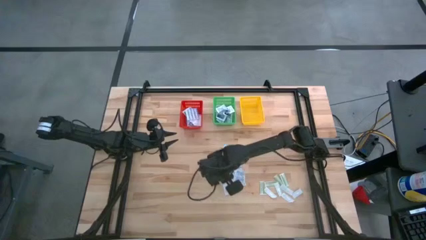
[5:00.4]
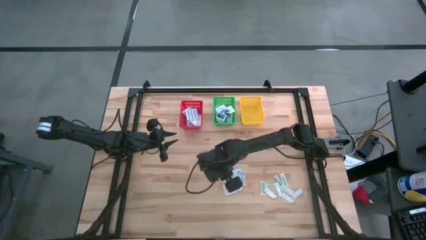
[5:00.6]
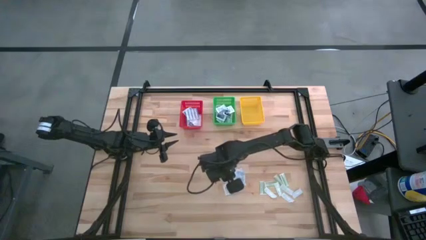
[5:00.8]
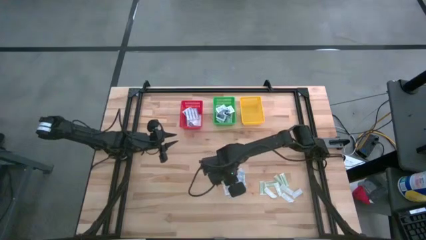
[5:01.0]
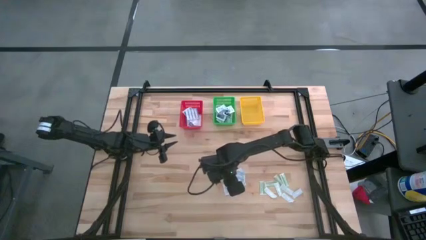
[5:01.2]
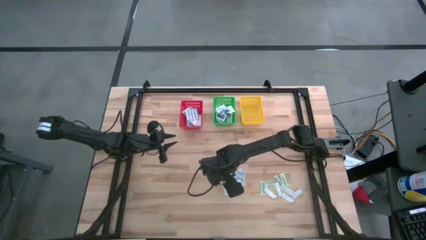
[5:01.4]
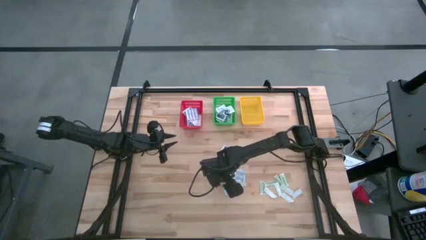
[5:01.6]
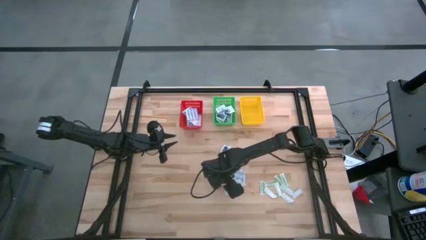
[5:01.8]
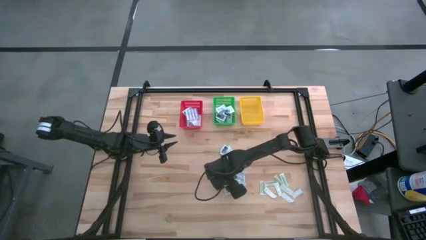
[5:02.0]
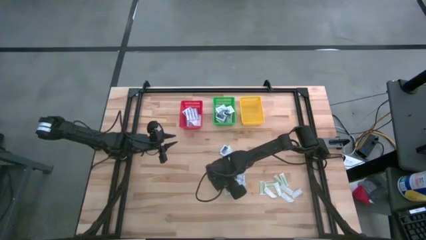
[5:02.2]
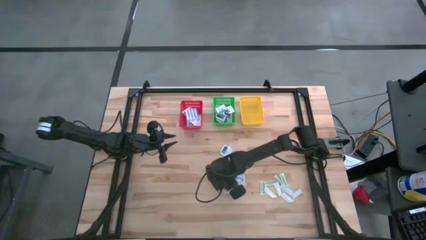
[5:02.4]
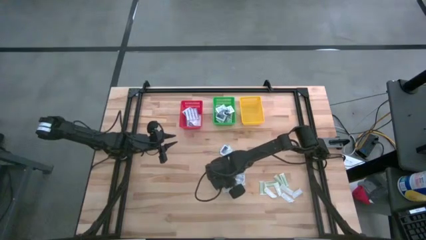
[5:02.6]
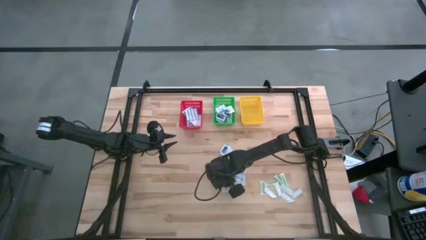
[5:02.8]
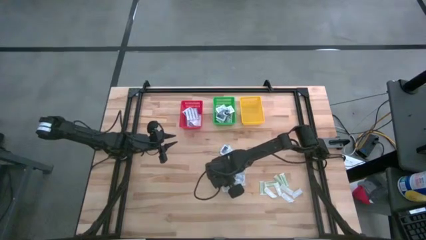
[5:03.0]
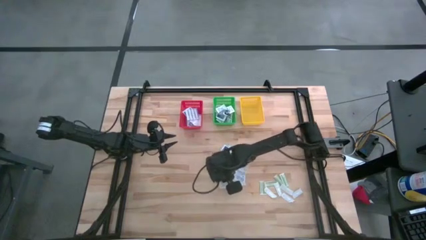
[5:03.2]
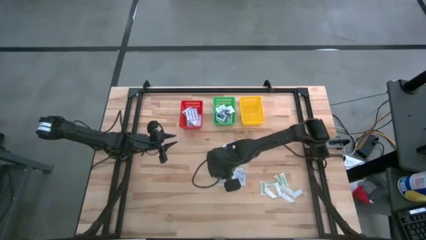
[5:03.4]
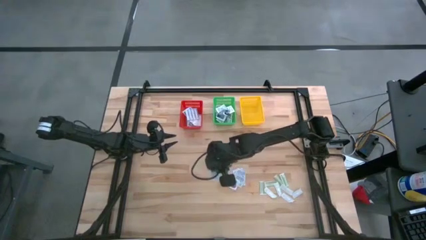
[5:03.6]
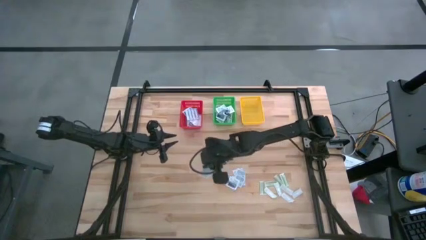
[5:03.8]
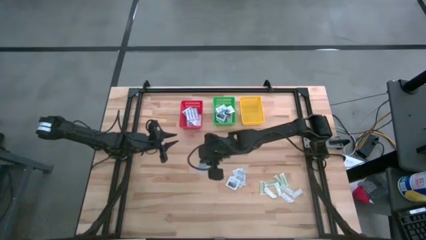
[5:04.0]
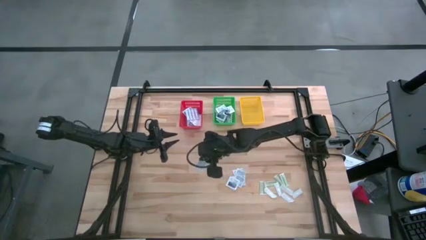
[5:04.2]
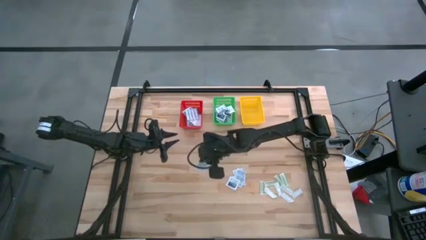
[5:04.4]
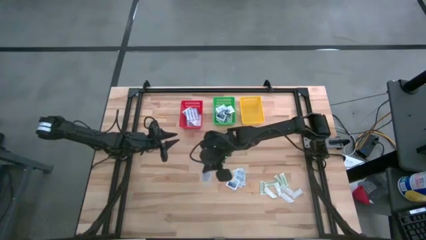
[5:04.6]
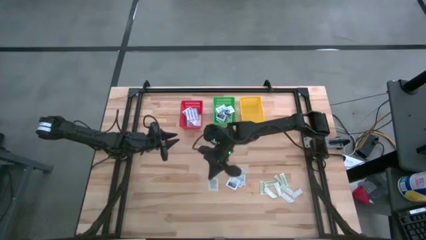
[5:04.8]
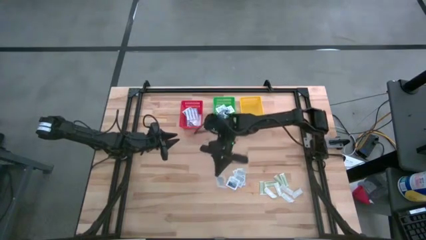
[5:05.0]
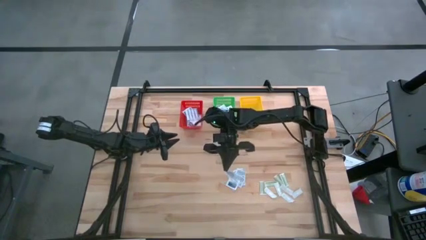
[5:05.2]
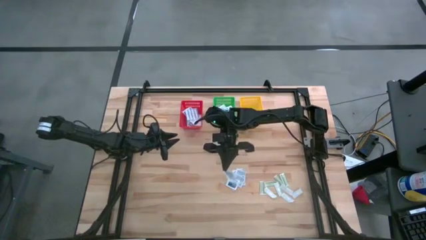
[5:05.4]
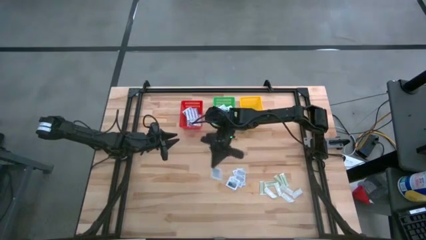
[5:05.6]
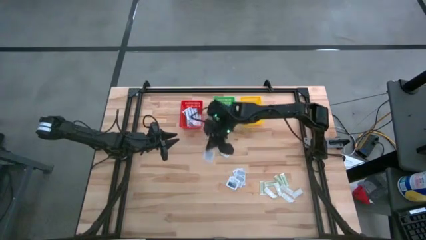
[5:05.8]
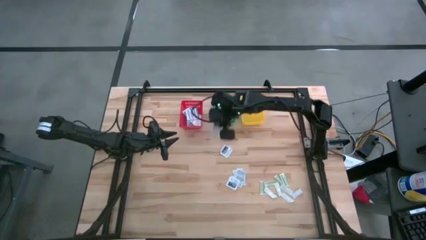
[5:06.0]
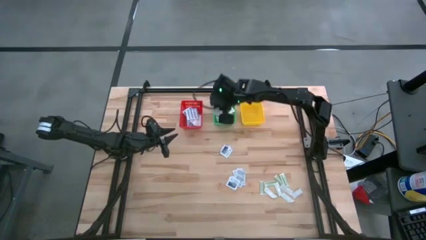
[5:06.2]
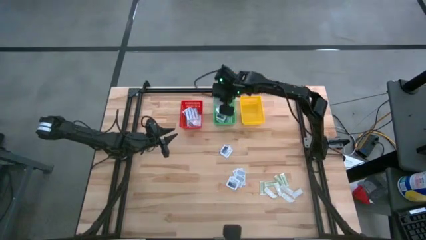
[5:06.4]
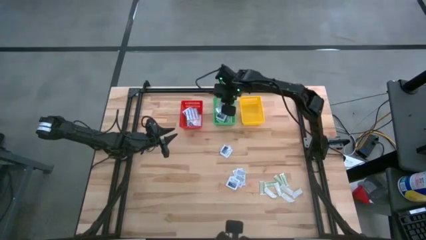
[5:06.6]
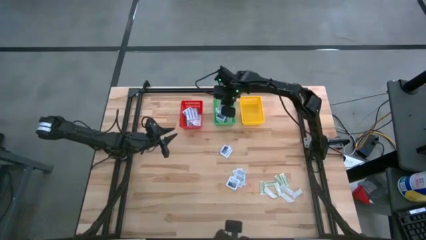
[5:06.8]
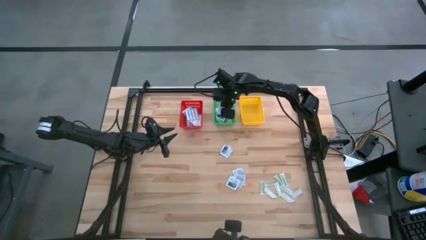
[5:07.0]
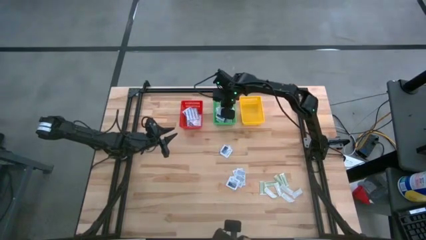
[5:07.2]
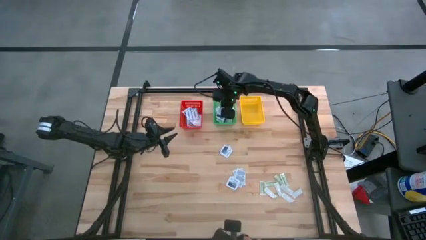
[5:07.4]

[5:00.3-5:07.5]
Task: Pick & Place First Aid Supplies
Put the alcohol pad into the green basket

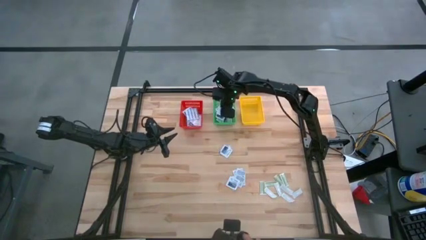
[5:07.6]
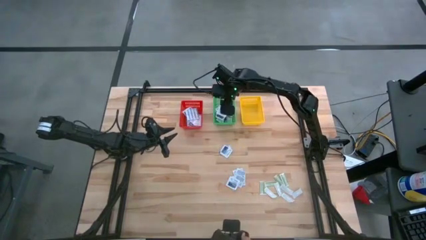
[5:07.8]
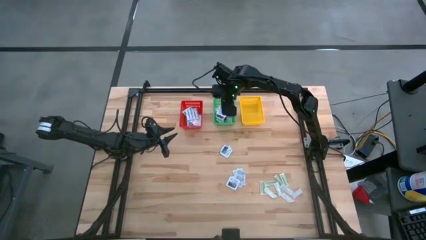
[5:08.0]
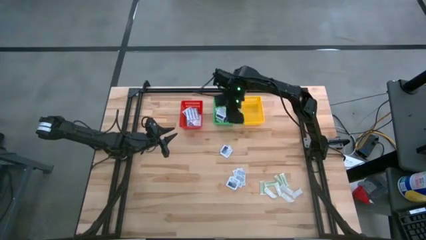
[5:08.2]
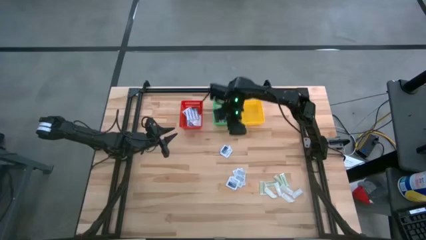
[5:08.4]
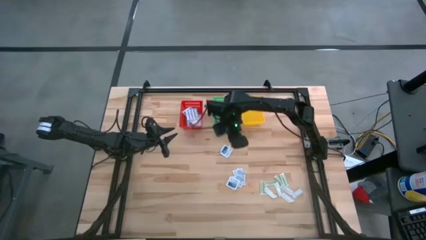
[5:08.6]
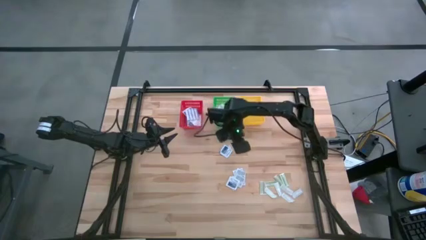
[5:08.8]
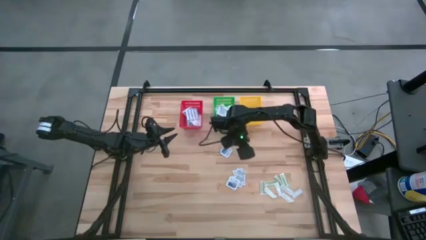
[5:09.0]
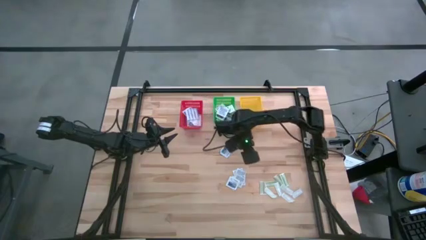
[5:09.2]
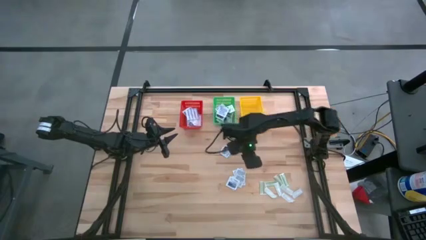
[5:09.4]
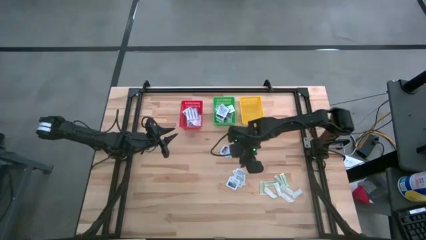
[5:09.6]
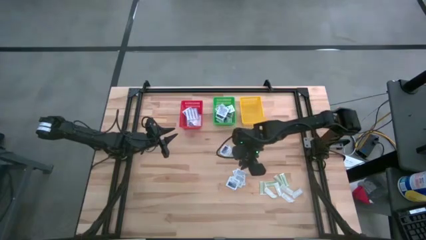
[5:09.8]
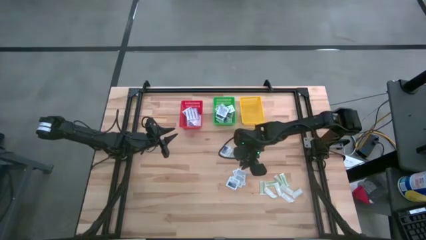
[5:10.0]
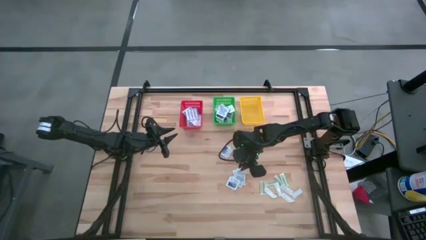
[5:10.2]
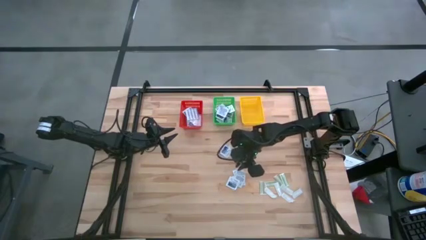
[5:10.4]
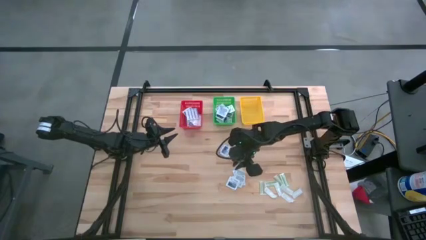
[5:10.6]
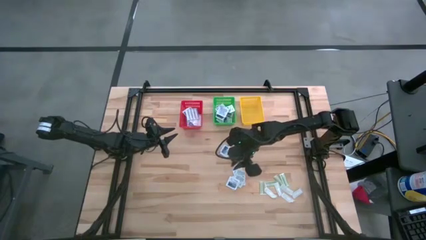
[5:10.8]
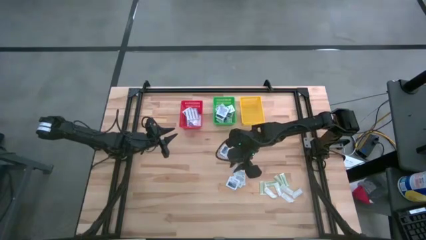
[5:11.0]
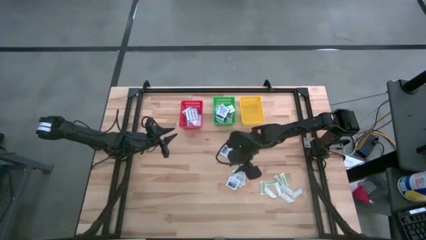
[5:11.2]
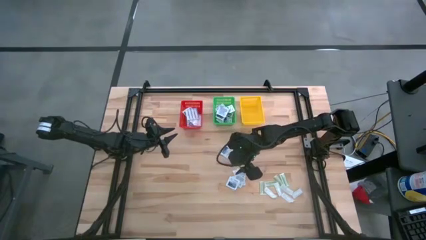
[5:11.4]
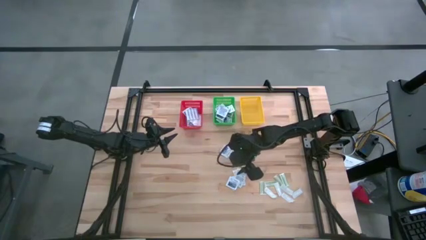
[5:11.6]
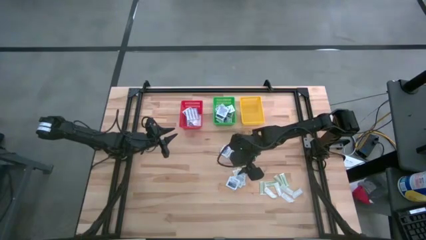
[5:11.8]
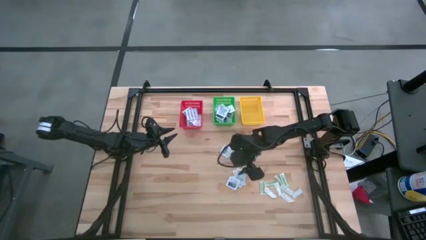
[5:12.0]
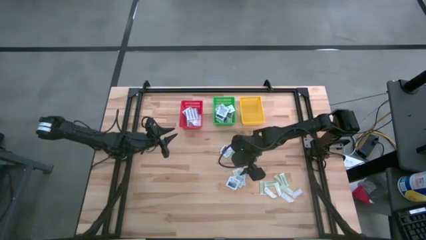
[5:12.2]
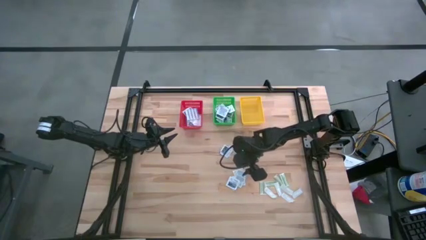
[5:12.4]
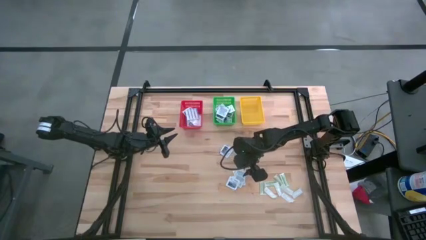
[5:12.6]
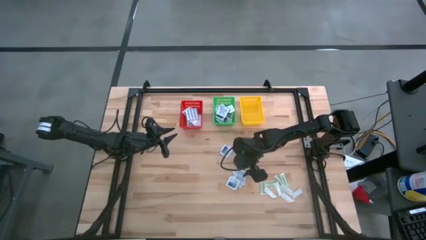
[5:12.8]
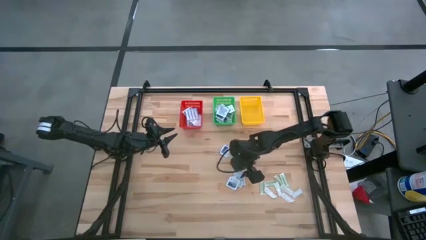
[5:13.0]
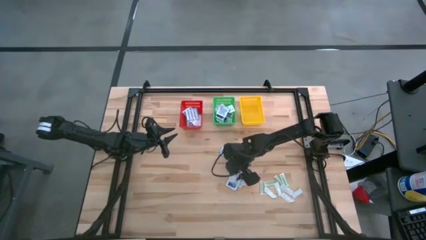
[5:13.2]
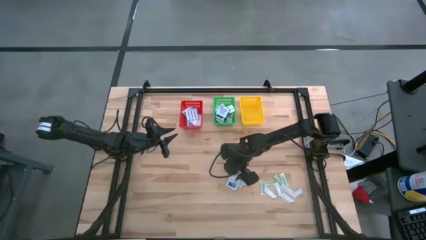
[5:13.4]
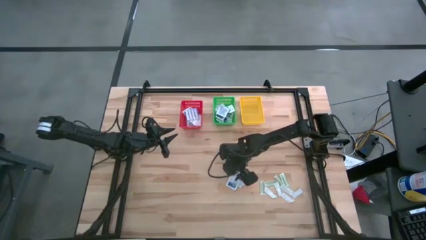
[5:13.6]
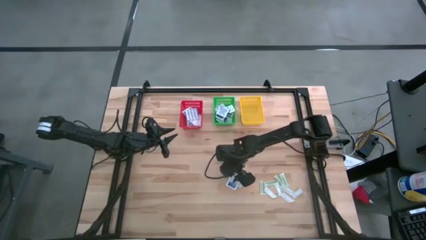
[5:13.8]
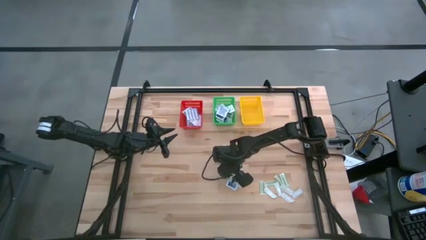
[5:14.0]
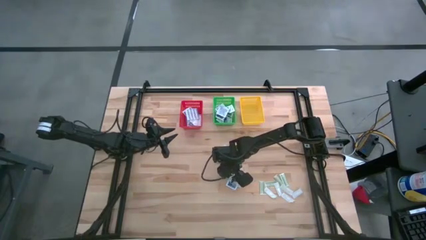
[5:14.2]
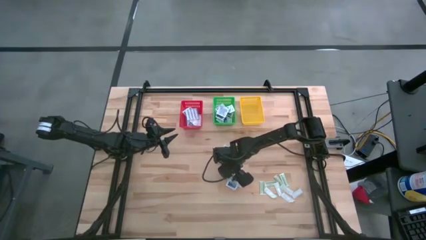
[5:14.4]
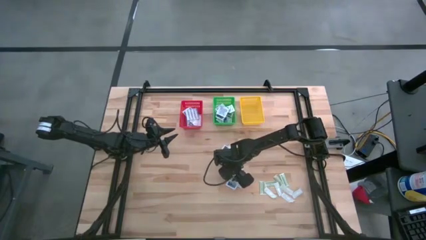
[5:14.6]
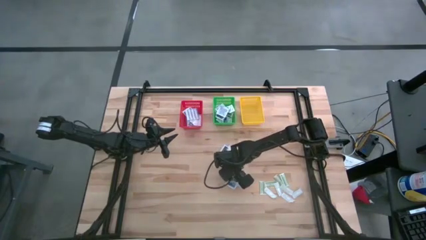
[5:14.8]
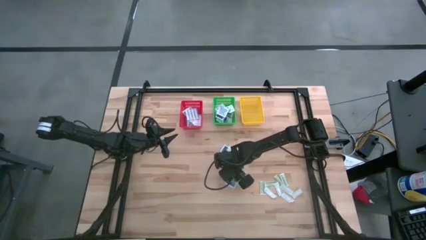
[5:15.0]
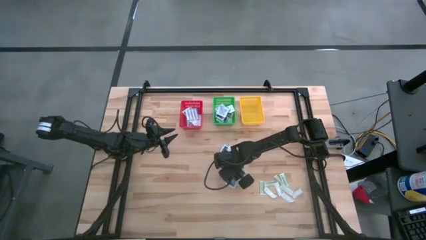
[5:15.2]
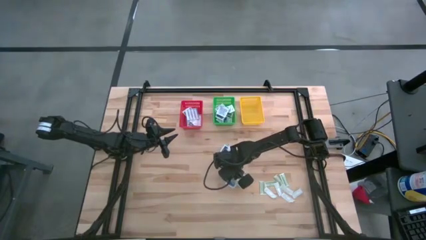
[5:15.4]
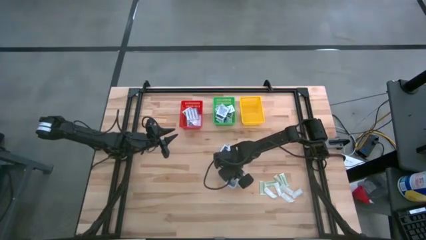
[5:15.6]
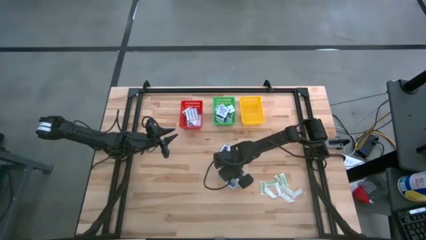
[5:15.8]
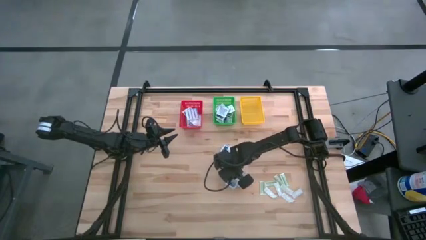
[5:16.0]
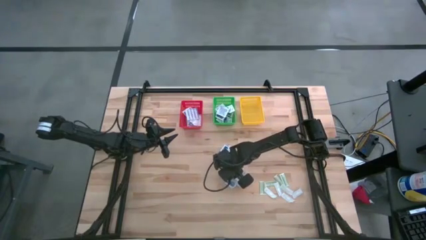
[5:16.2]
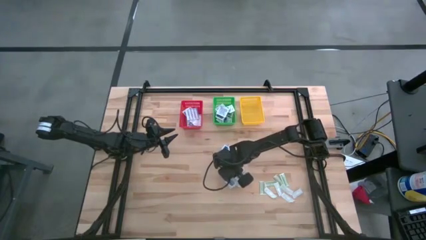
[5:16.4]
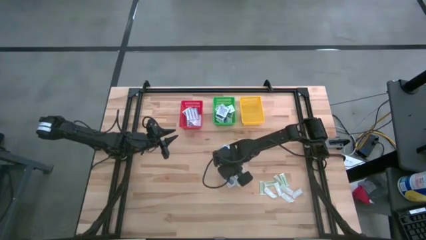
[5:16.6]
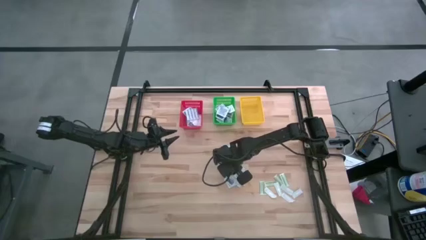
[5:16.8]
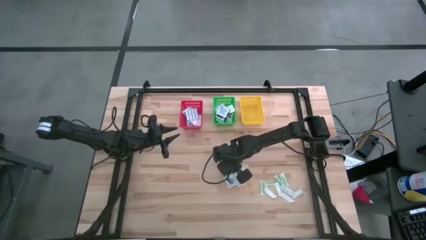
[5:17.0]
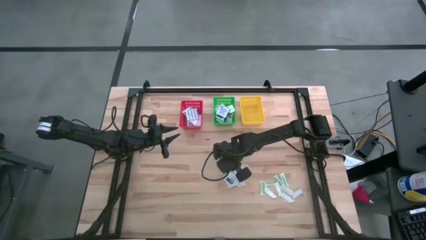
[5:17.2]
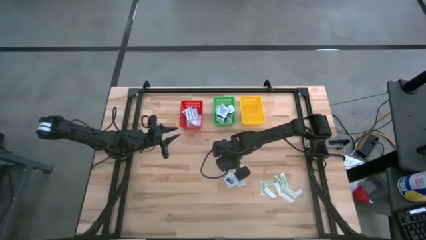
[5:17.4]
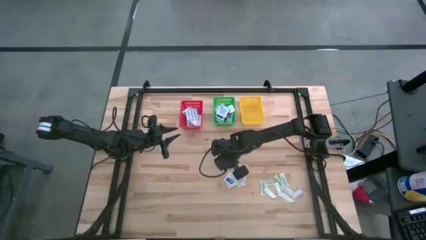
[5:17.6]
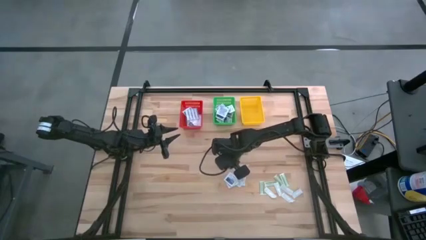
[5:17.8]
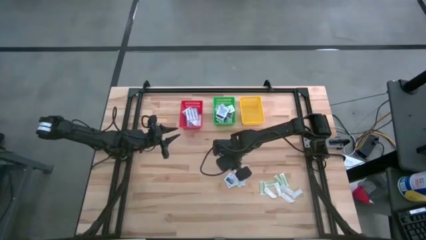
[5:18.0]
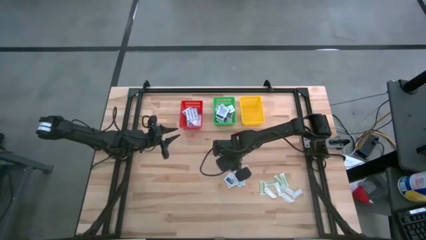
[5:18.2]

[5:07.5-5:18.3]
Put the alcohol pad into the green basket
